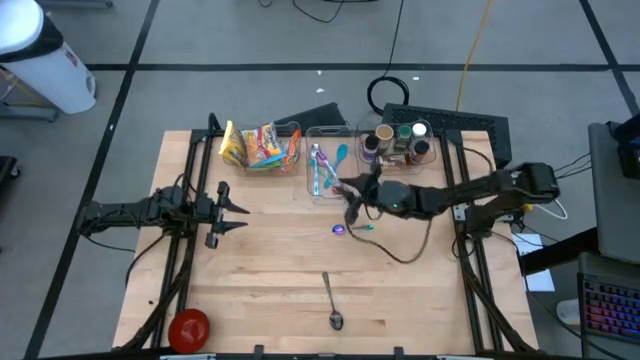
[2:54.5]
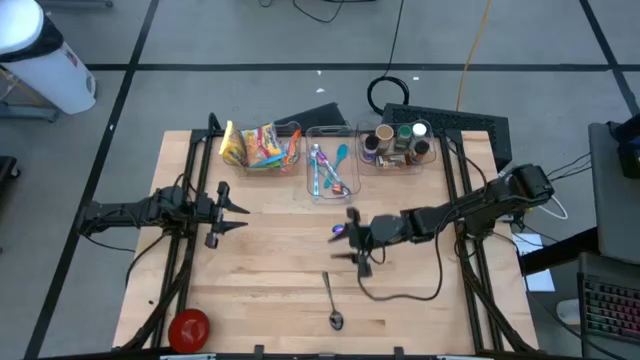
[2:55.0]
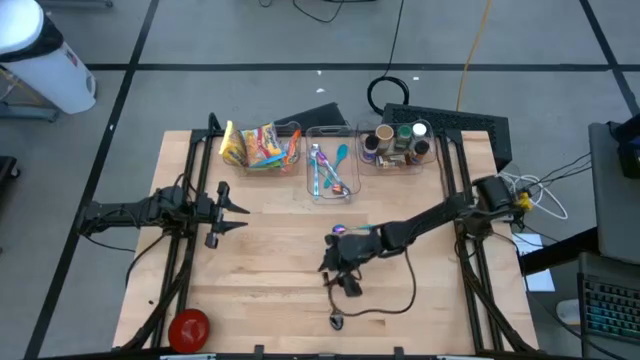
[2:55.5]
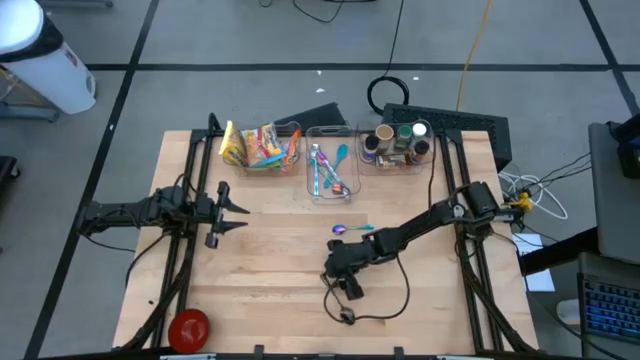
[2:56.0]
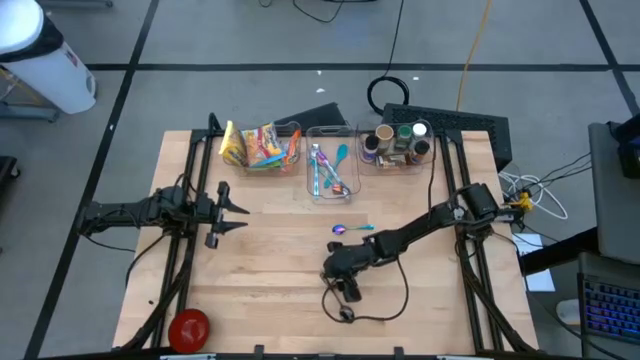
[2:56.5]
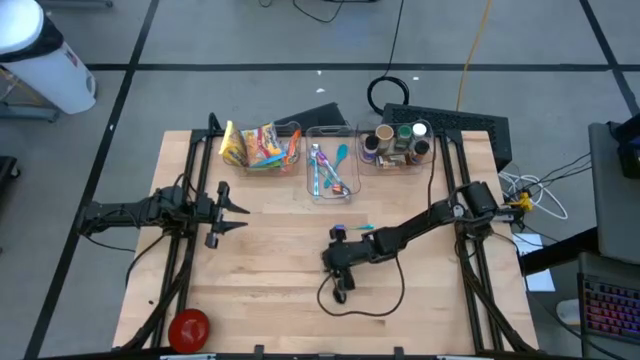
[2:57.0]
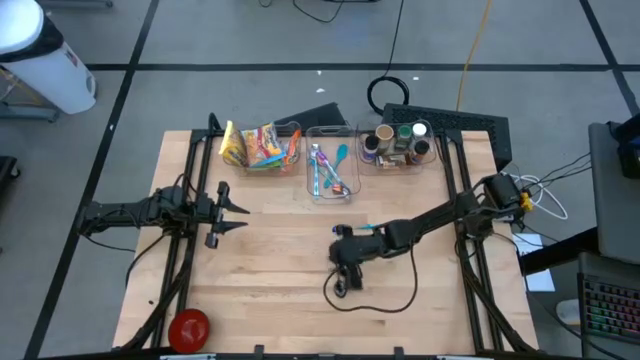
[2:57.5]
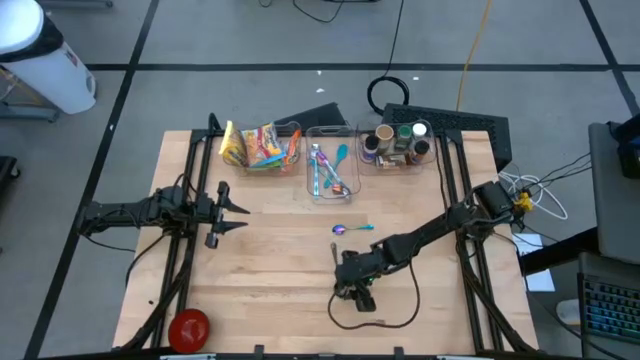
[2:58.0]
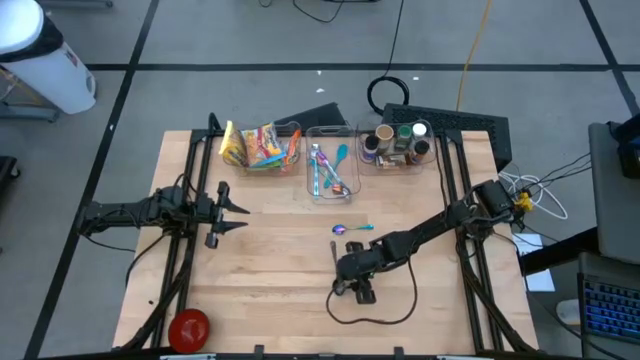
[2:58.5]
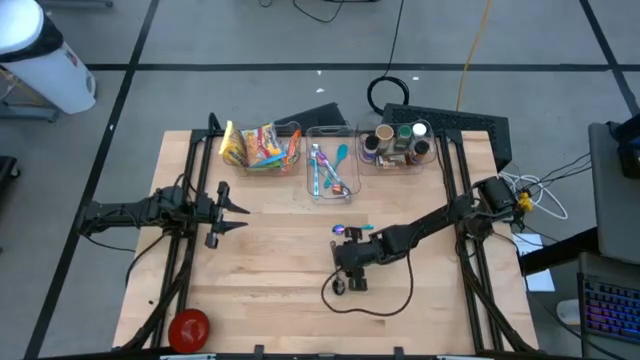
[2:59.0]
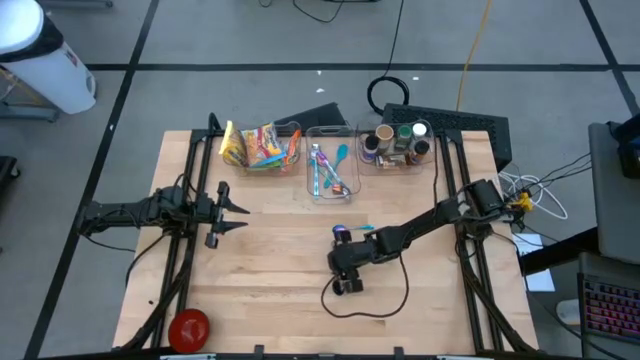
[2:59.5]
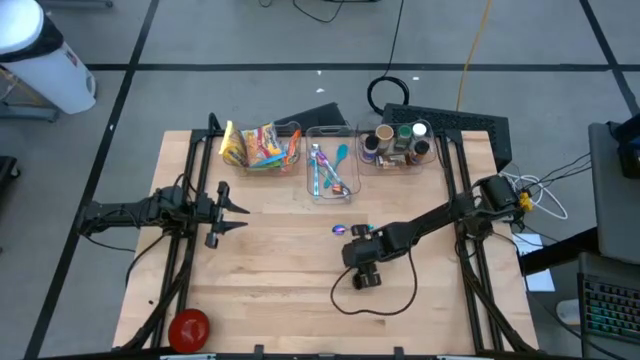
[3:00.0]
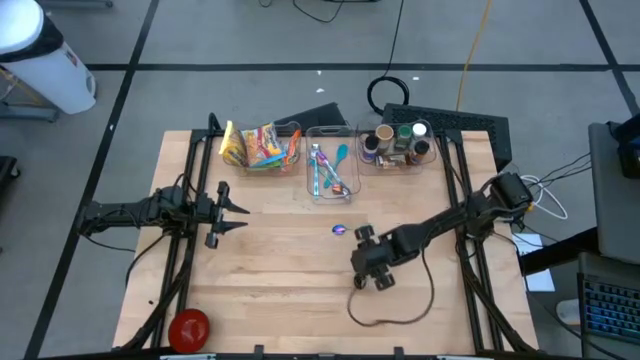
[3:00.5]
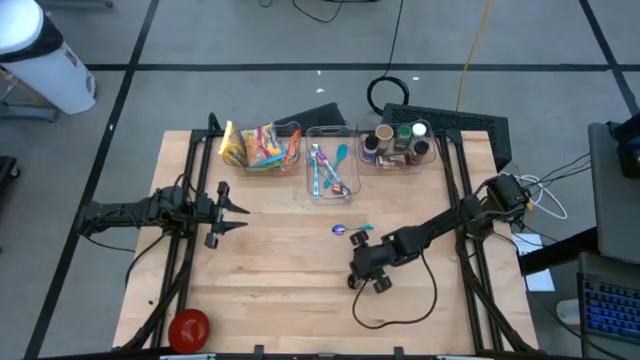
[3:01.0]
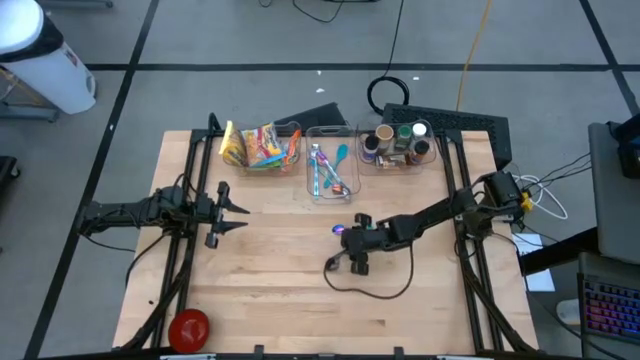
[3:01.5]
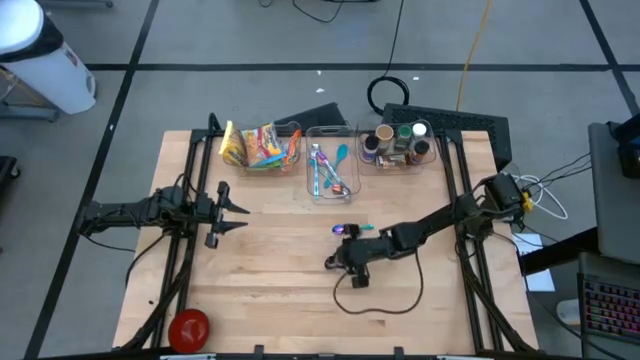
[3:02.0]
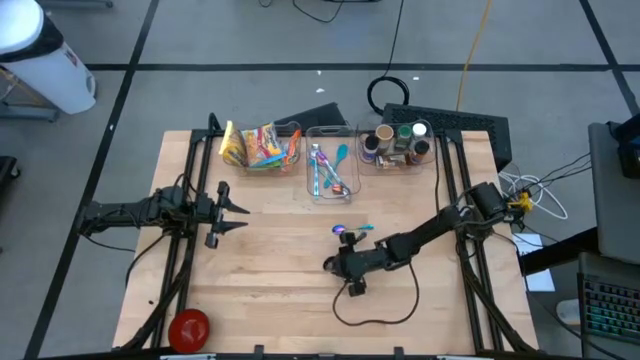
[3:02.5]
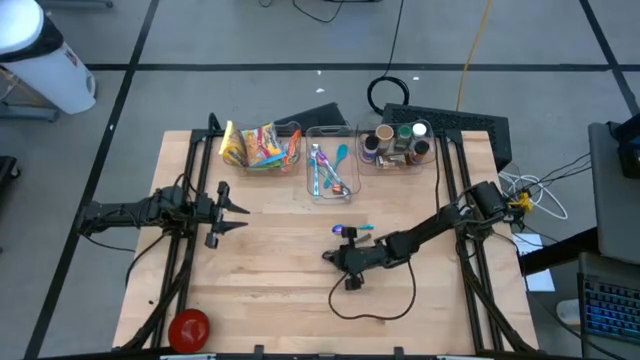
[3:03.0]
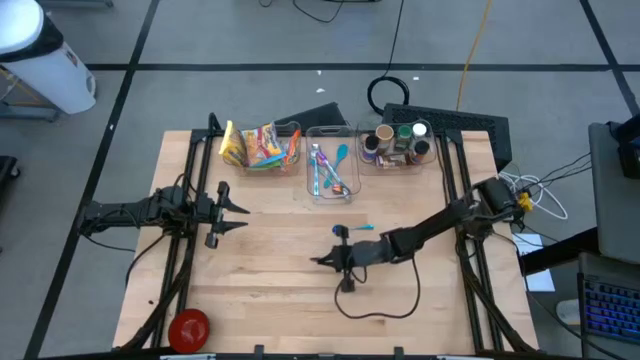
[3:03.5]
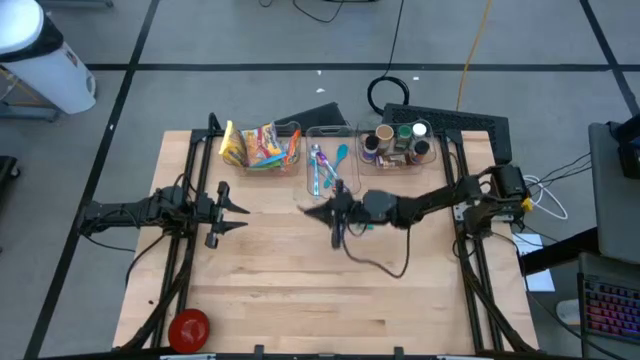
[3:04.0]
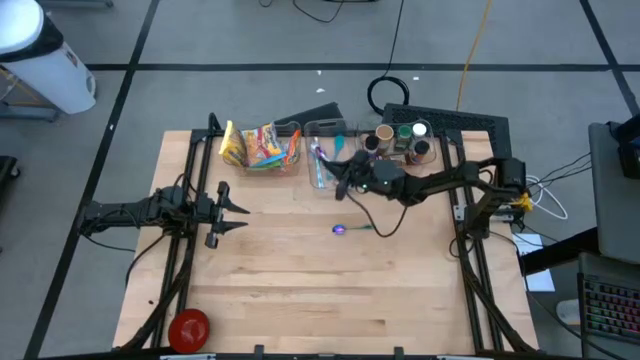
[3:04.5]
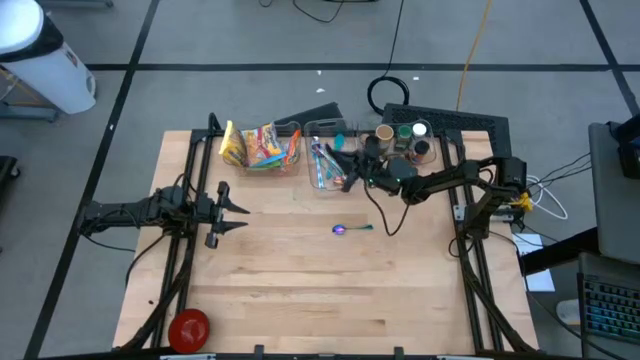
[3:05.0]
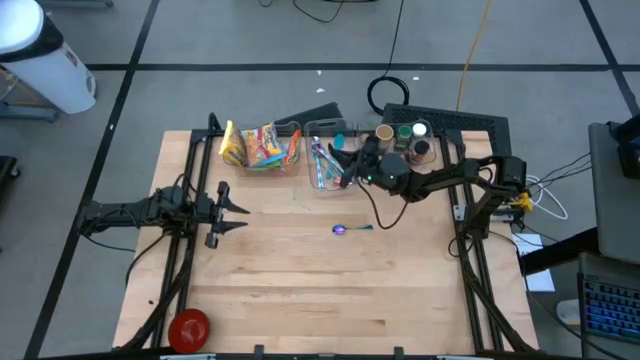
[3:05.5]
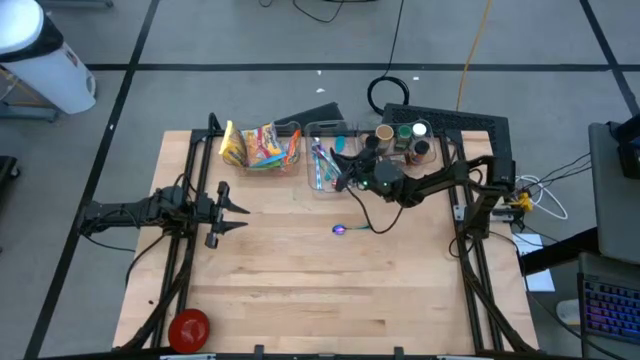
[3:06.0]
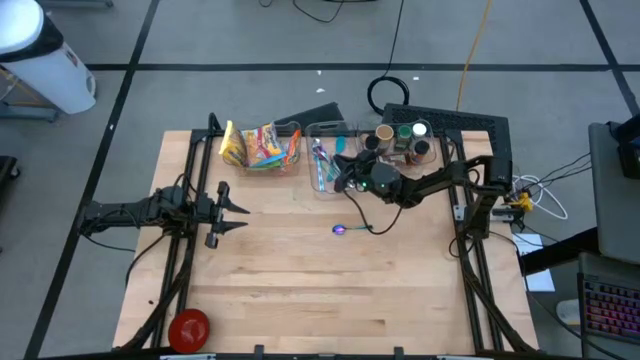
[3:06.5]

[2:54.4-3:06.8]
Task: Pick & Place Food Item
Put the black spoon into the middle transparent bin

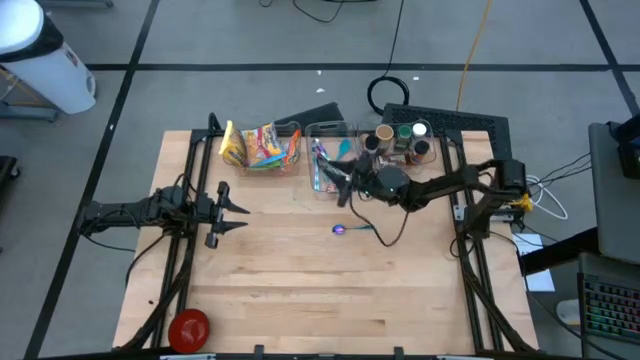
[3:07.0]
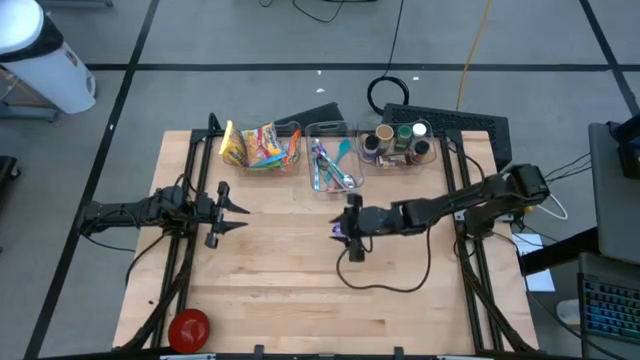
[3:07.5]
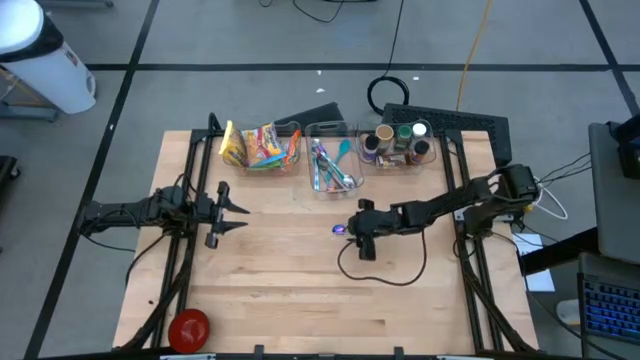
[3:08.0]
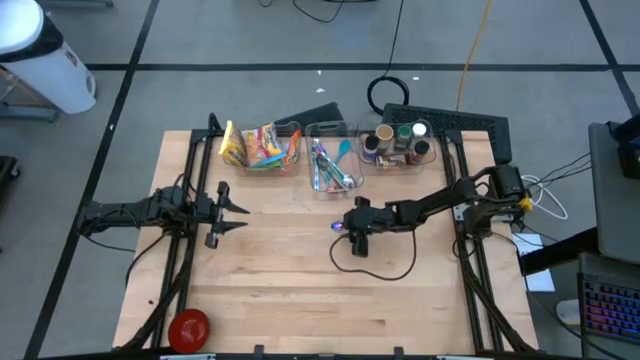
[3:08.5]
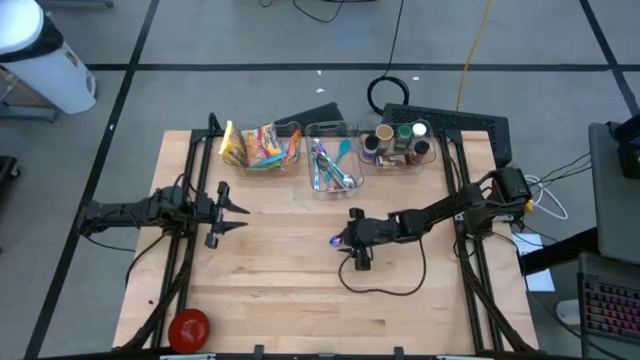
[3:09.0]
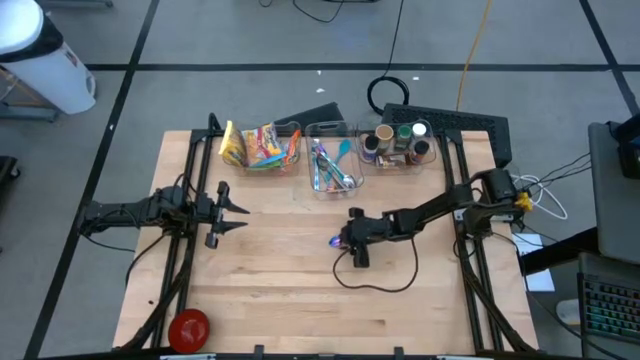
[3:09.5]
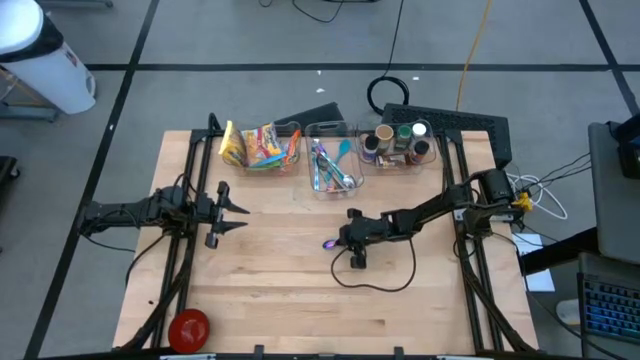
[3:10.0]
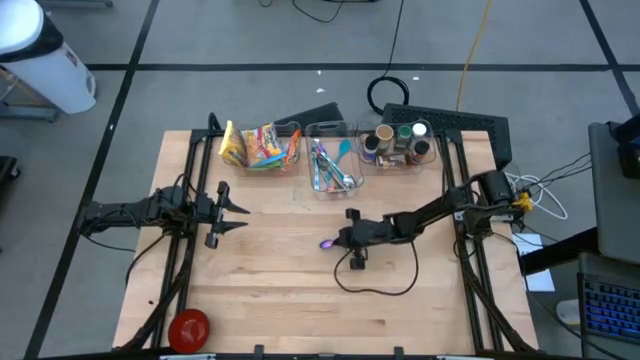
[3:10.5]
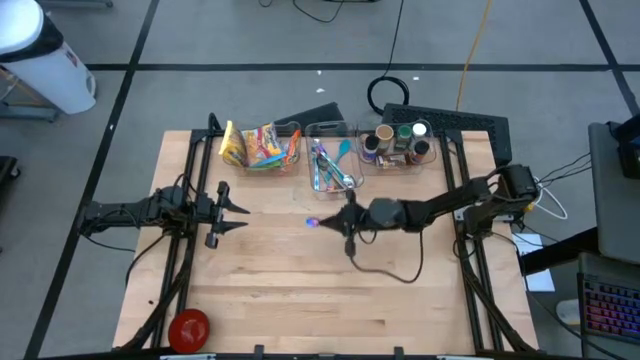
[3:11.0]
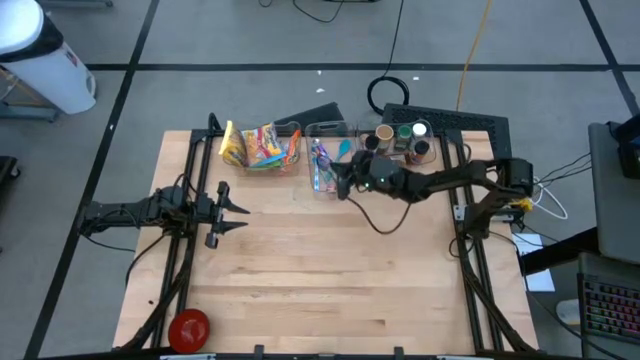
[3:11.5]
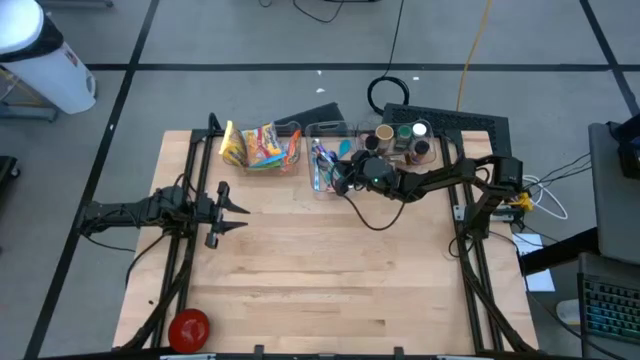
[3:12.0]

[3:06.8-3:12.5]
Put the blue spoon into the middle transparent bin

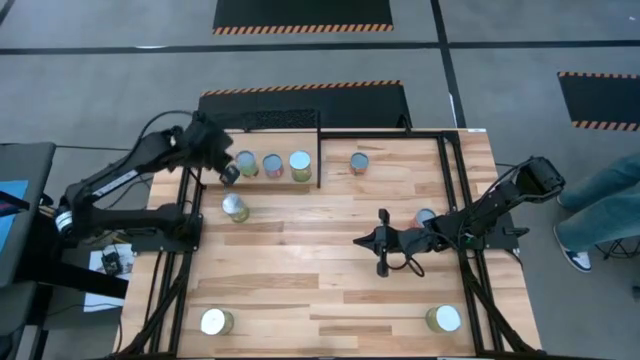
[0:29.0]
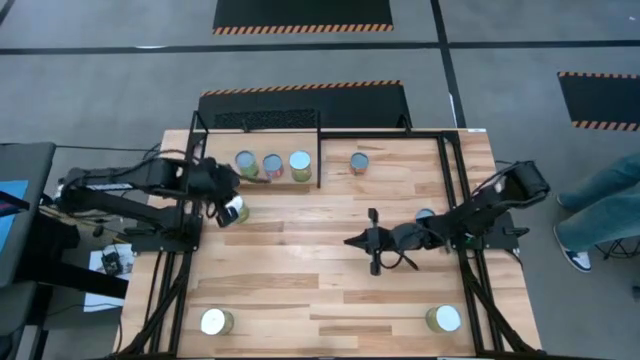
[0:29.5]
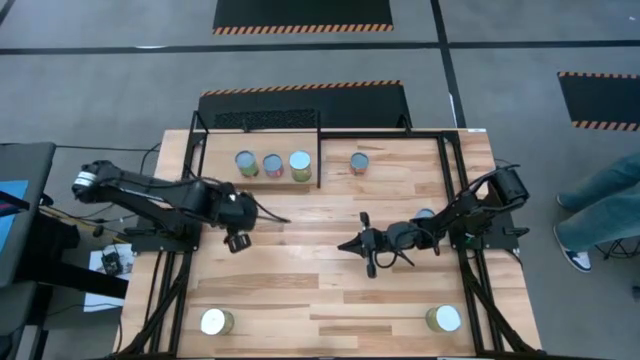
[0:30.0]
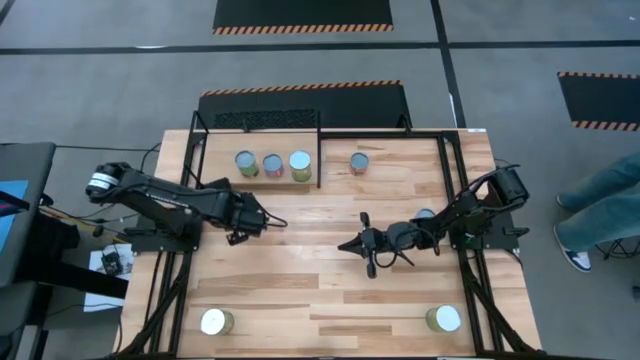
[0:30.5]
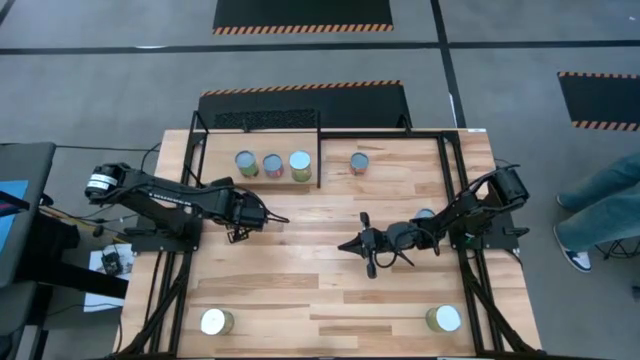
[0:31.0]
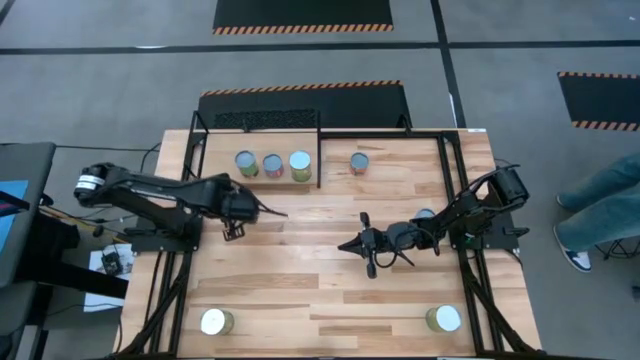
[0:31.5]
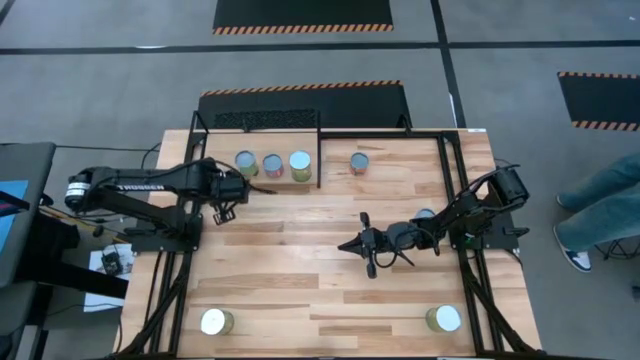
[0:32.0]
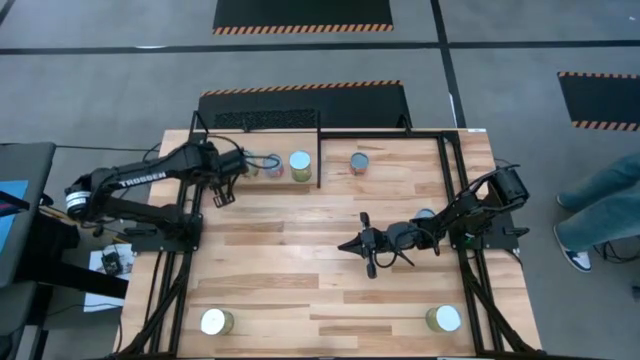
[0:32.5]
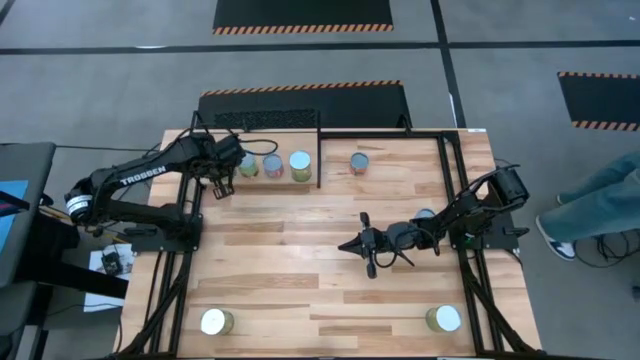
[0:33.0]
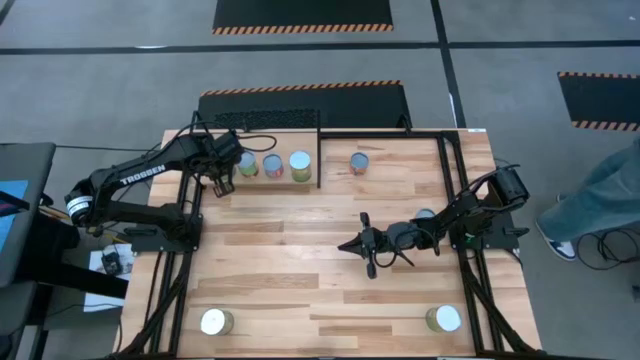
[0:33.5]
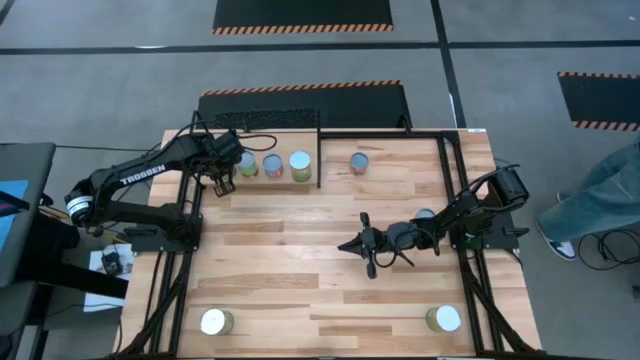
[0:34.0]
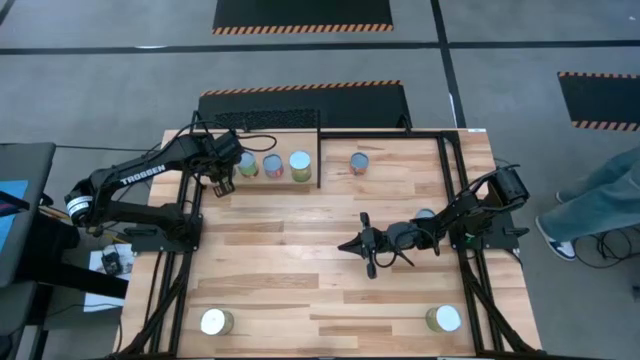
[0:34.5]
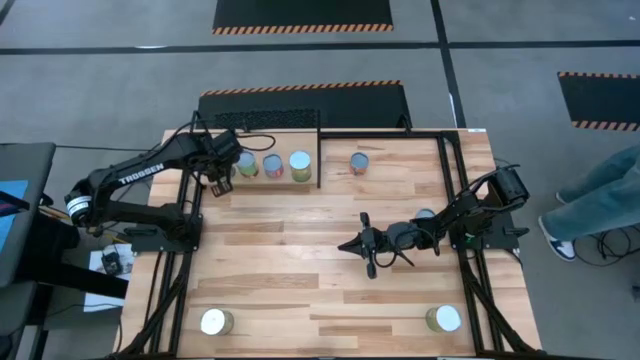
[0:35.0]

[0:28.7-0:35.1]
Task: Pick and place cans onto a shelf
Put the top canned pears on the shelf
